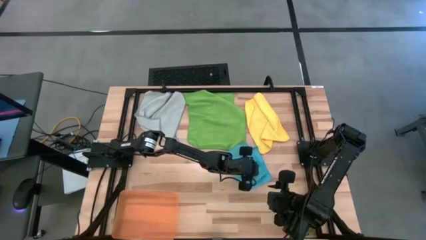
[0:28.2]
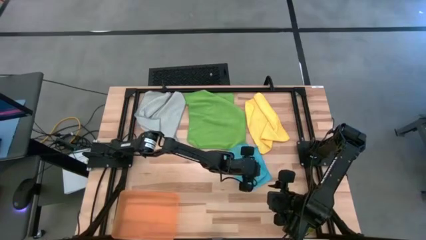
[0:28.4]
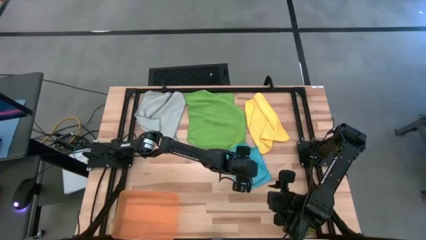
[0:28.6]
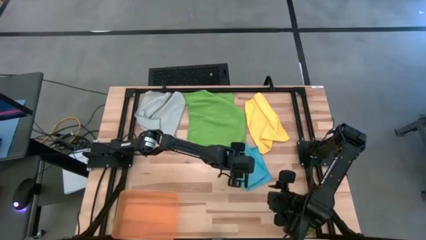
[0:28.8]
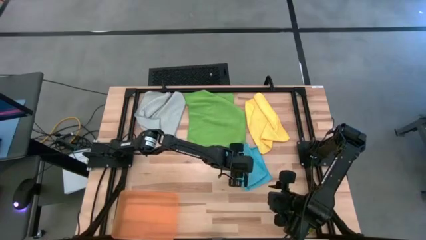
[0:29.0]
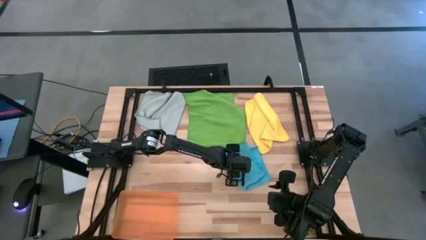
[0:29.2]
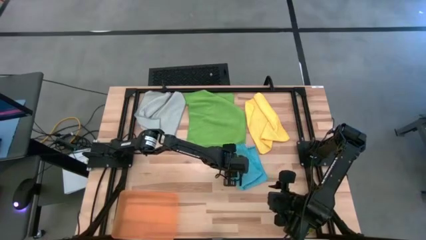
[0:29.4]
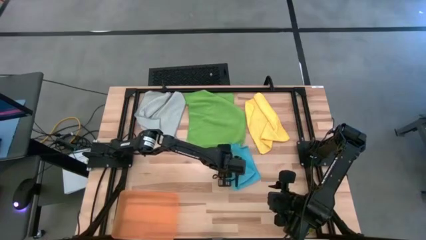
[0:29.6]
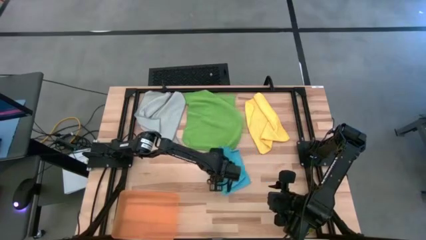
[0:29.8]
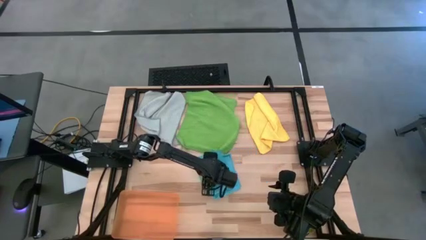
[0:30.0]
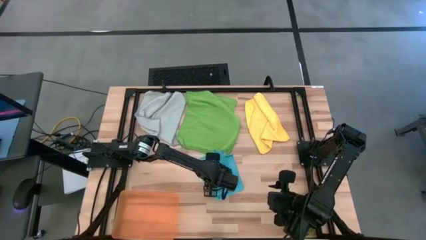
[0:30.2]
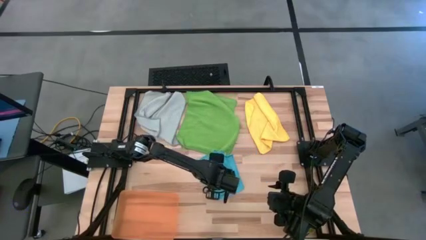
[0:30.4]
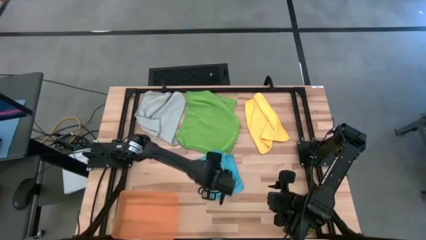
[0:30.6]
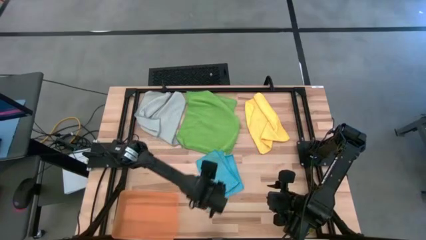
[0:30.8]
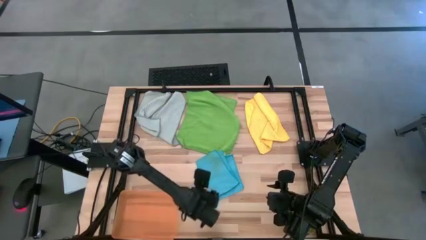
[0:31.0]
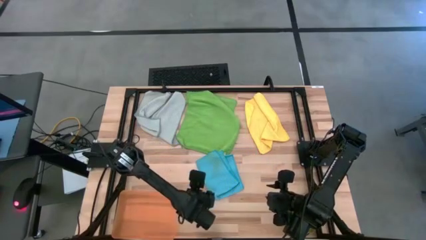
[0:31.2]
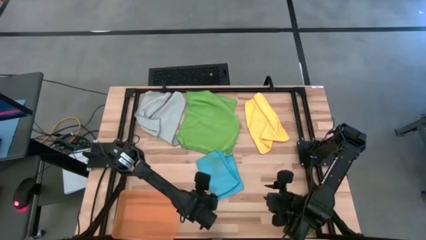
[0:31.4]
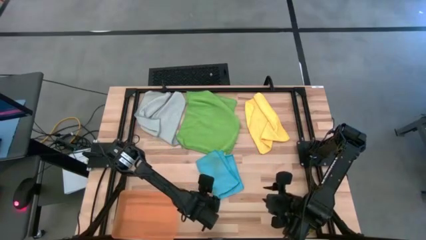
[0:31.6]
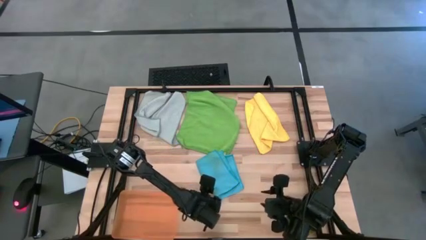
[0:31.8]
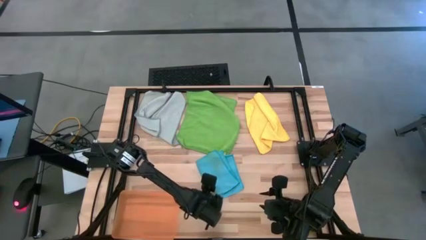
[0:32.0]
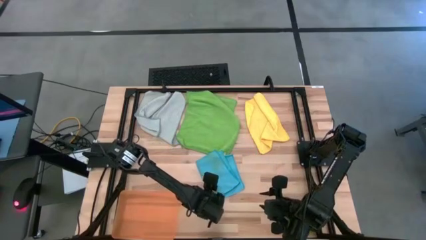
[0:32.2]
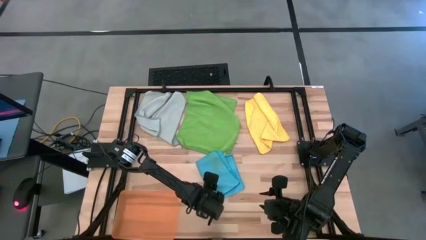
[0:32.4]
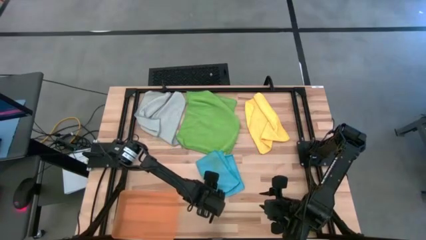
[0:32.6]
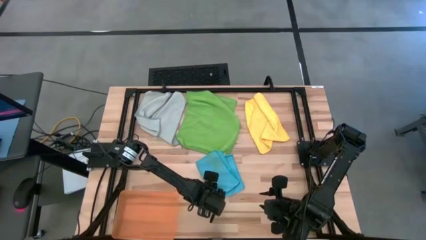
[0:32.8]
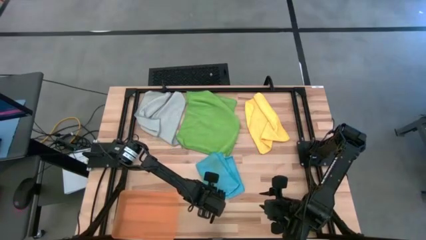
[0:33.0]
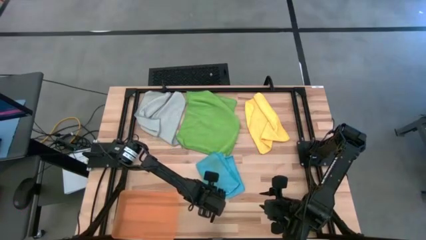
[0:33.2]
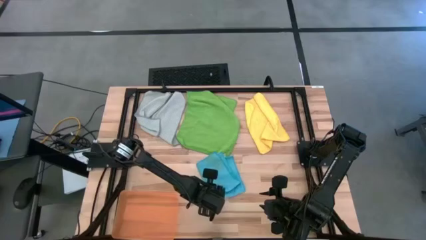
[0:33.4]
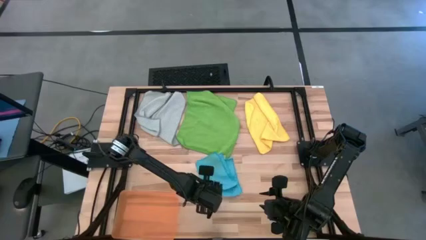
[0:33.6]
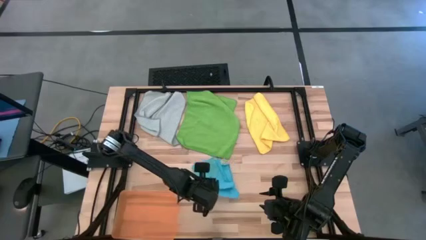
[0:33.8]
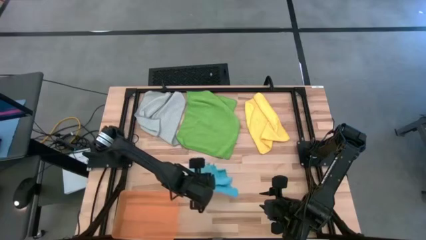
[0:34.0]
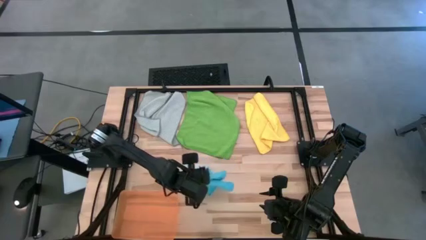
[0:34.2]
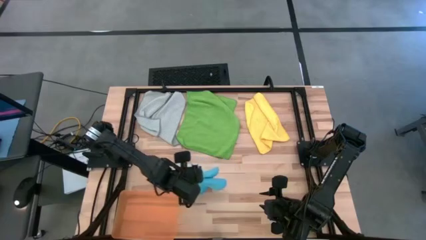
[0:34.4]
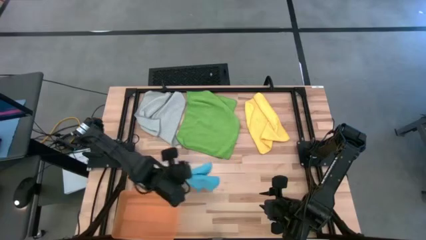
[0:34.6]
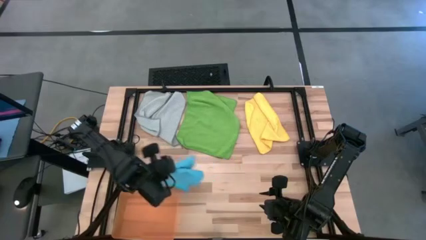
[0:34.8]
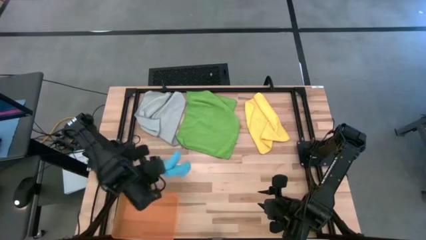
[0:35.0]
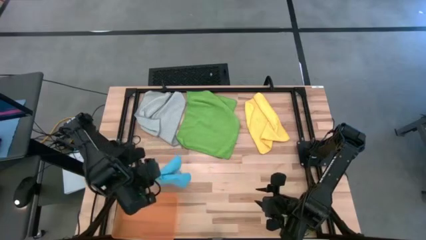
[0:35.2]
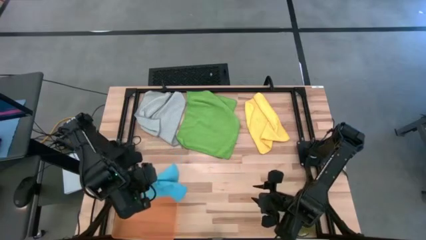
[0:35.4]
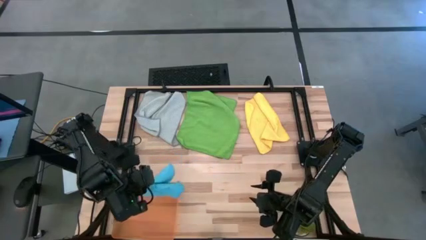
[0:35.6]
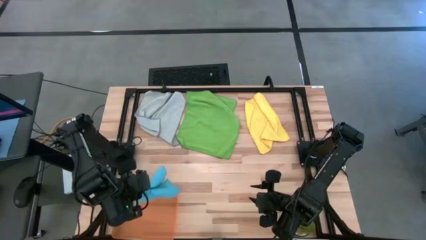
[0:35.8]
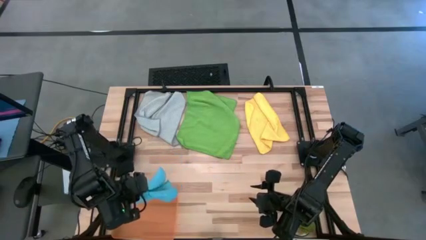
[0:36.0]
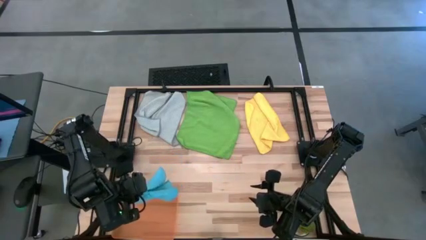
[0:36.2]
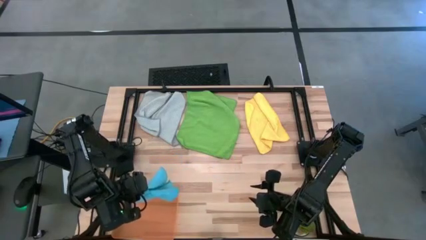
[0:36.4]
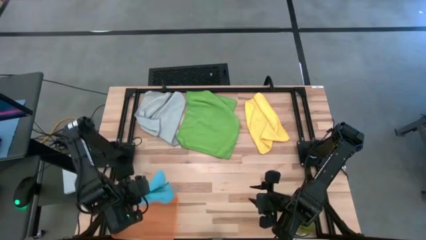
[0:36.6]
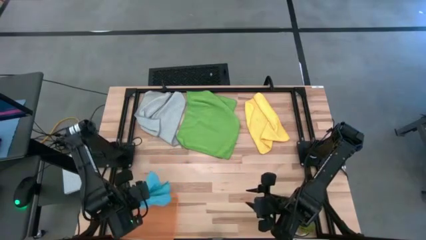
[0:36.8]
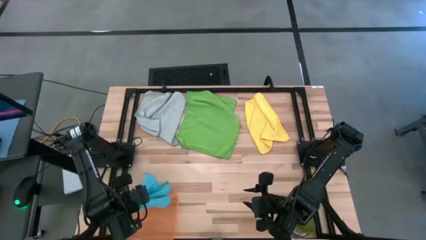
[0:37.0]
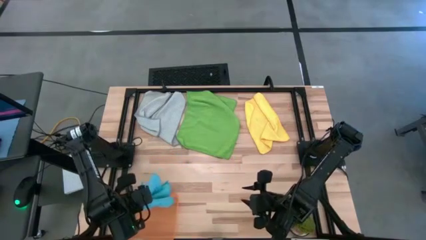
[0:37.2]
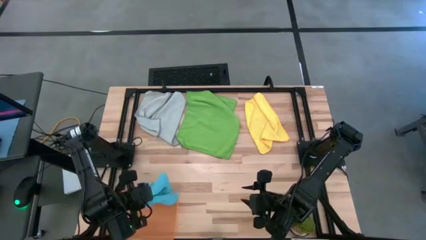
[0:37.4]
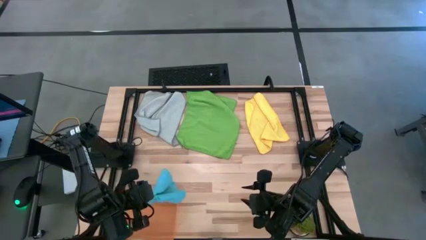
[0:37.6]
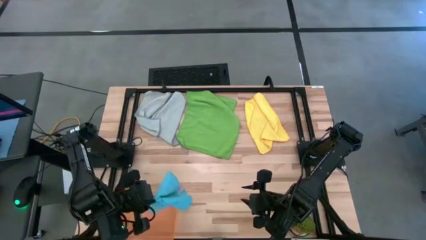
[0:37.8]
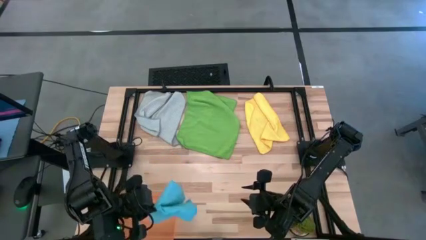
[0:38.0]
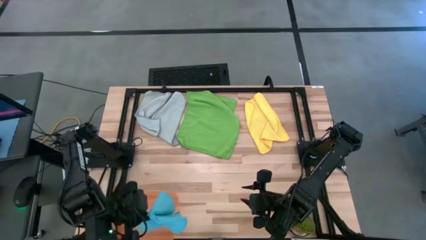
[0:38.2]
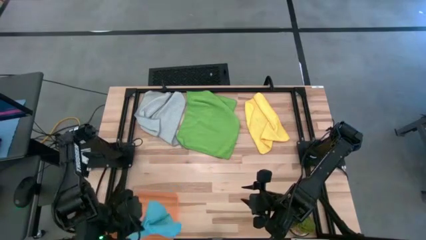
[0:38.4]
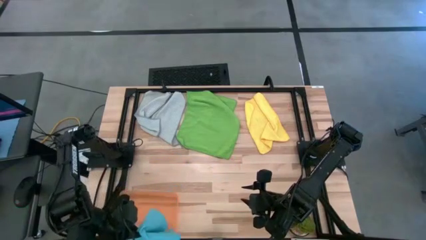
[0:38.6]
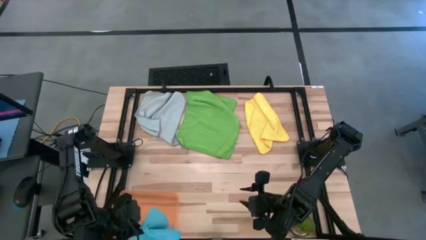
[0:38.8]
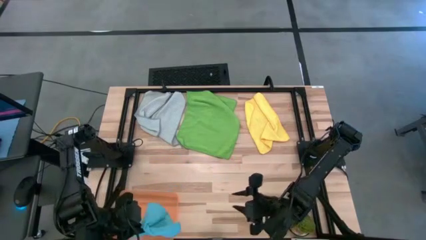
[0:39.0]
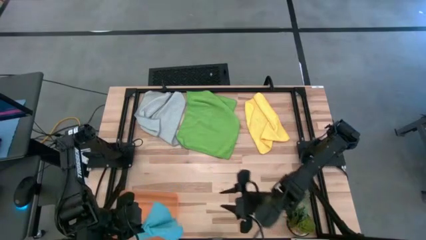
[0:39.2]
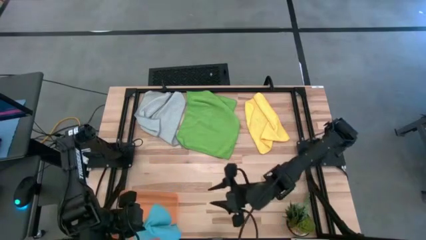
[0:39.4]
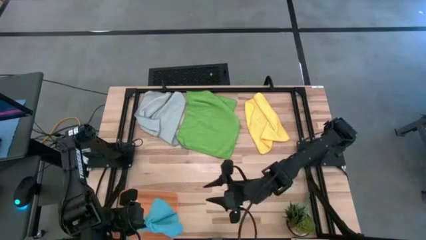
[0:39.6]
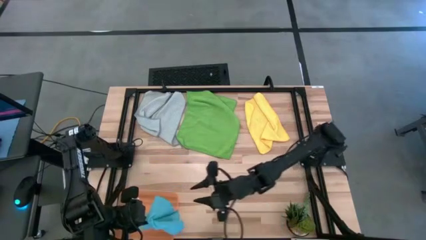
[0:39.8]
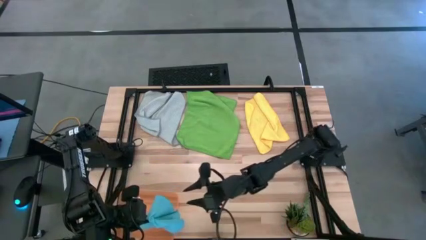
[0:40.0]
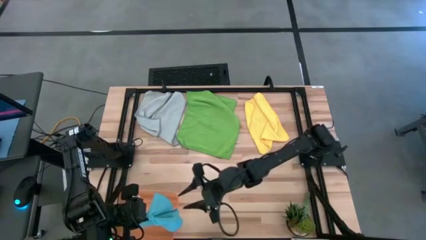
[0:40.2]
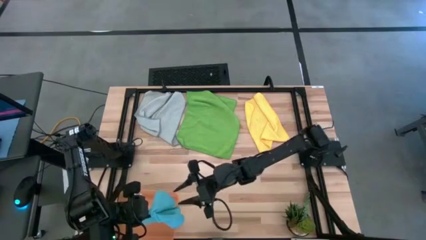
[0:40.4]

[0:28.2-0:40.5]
Task: Fold microfiber towels
Put the blue microfiber towel into the orange bin

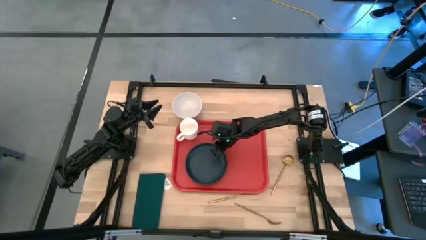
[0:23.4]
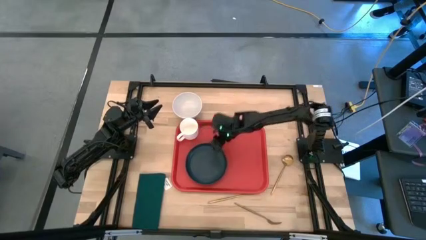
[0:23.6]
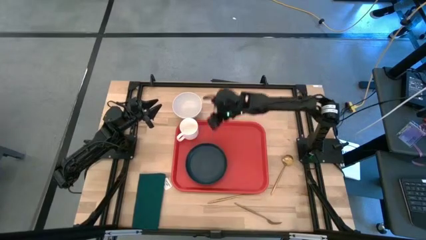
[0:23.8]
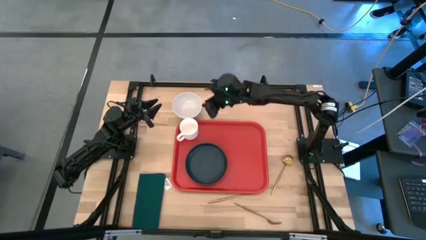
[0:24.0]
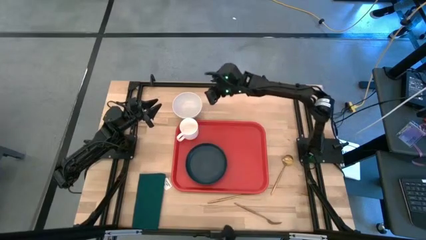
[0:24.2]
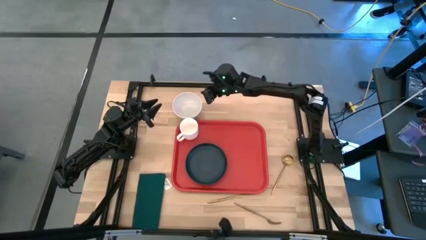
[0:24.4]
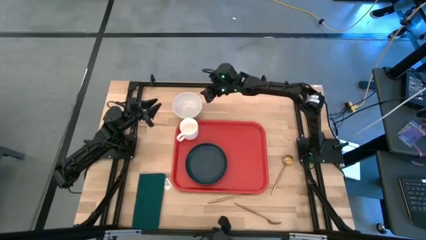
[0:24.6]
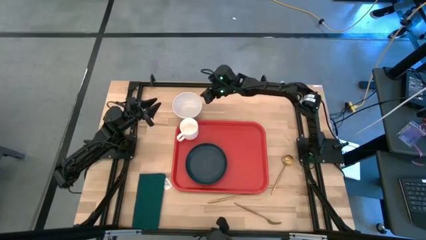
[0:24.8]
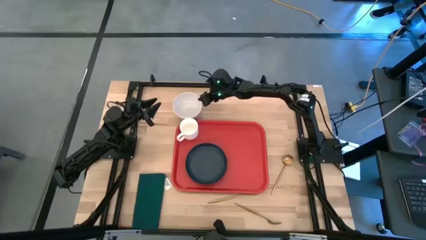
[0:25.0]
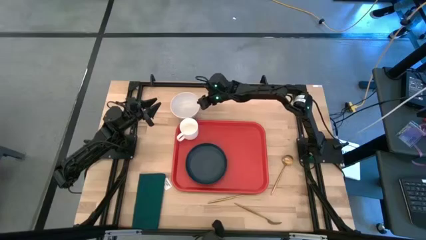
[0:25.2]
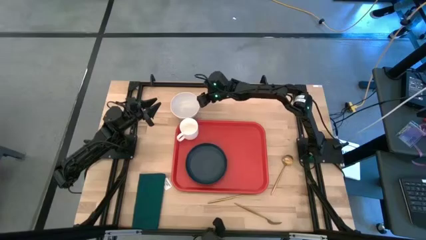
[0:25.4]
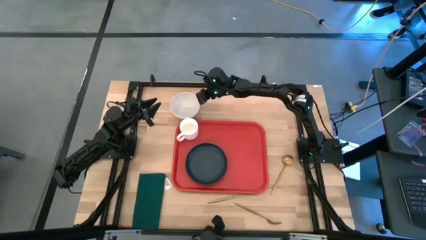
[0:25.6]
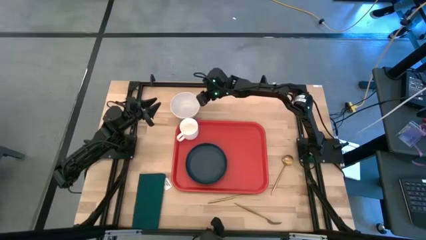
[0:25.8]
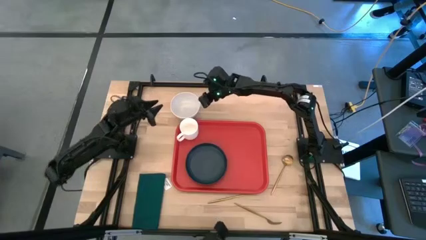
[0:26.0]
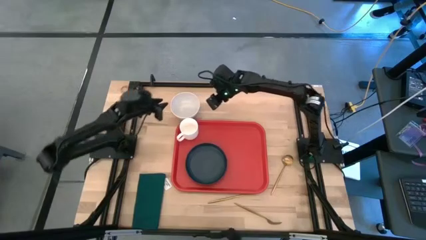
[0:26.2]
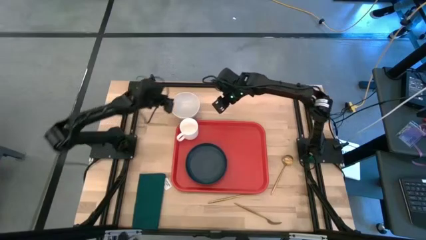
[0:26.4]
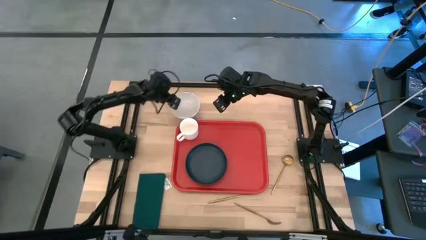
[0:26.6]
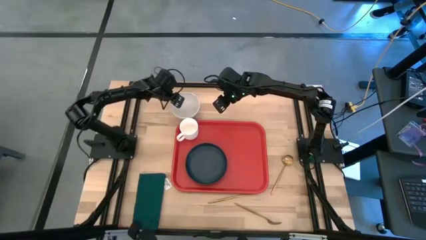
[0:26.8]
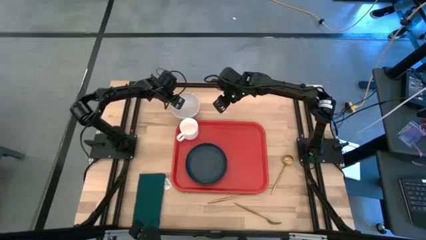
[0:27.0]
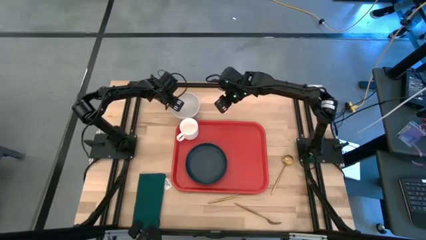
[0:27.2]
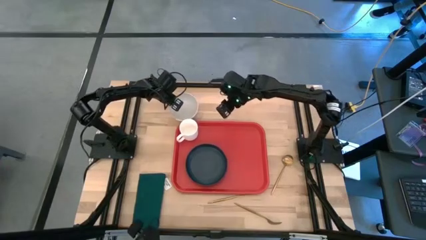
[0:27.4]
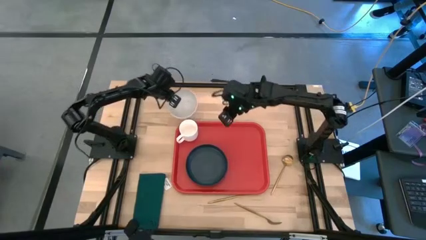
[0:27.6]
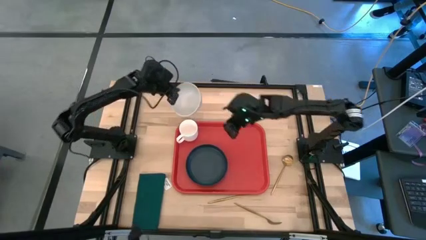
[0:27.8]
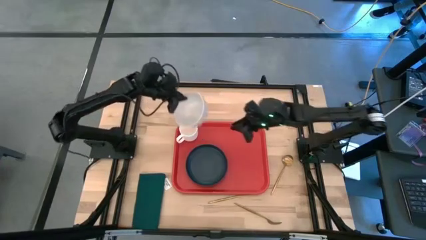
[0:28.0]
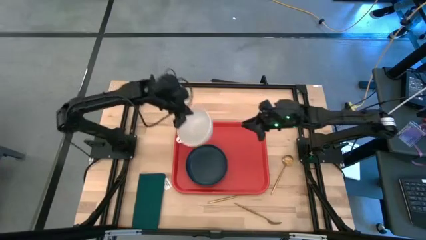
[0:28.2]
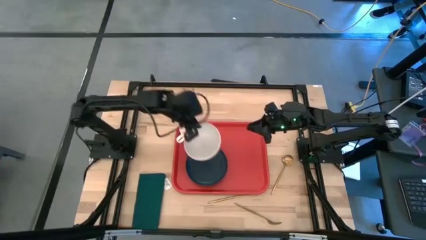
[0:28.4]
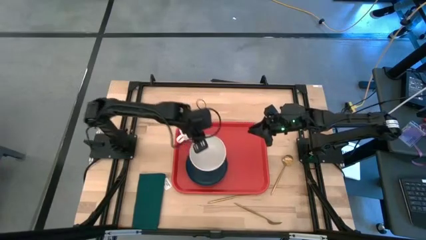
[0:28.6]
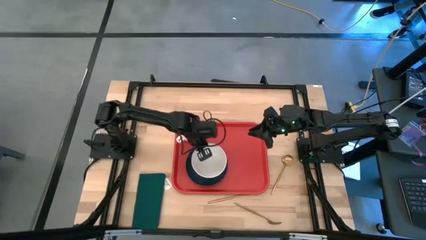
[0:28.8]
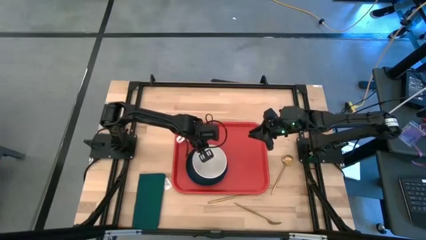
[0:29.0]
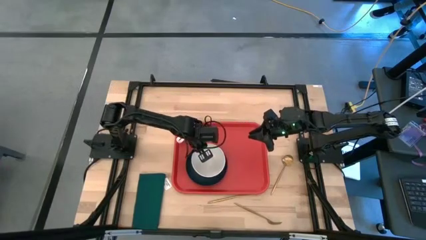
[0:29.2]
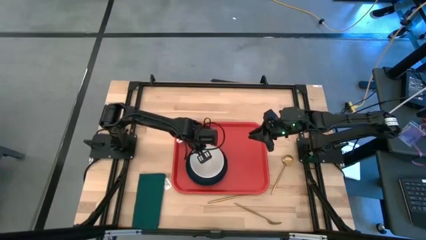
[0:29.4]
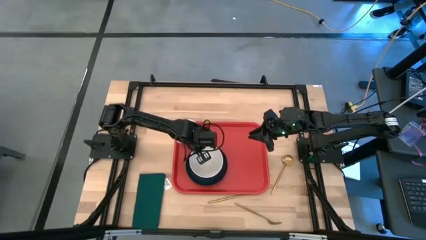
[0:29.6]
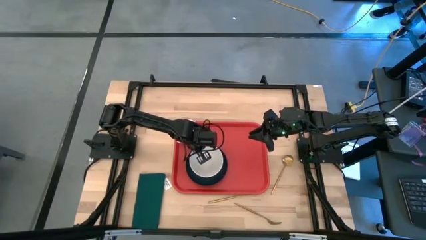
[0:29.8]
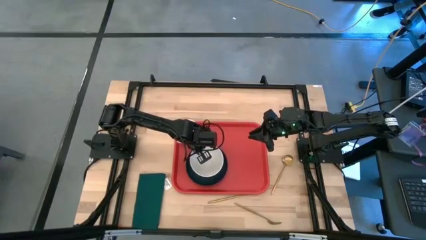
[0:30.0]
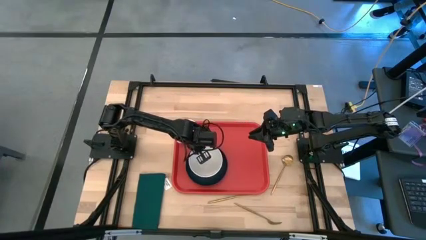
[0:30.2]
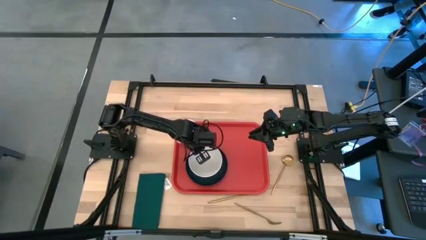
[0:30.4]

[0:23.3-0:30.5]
Task: Set up tray
Put the gray bowl under the white mug on the black plate on the red tray
